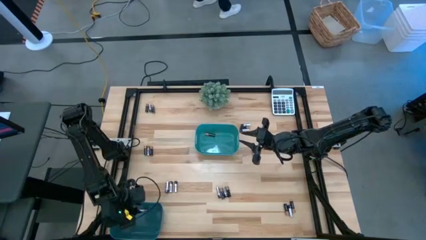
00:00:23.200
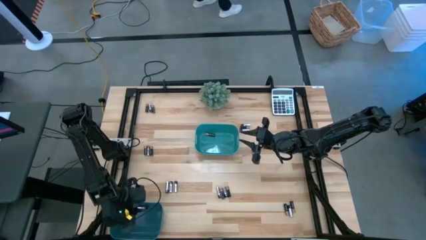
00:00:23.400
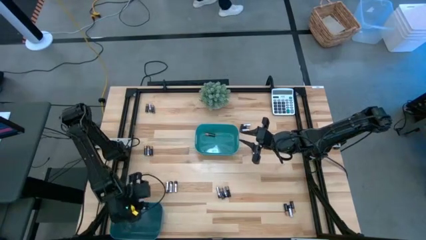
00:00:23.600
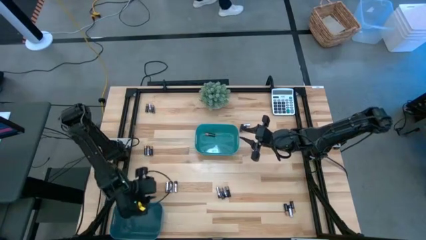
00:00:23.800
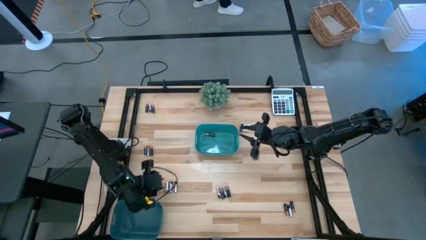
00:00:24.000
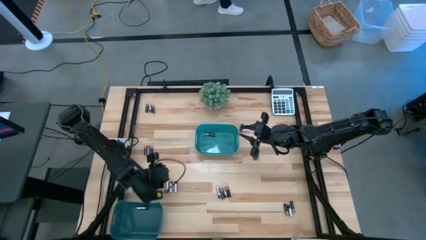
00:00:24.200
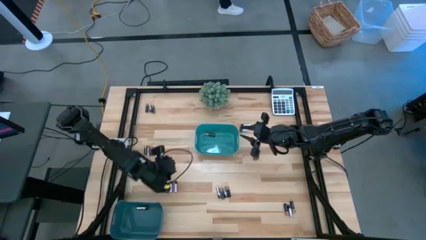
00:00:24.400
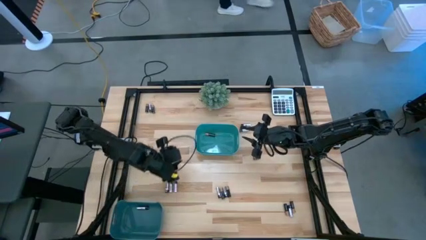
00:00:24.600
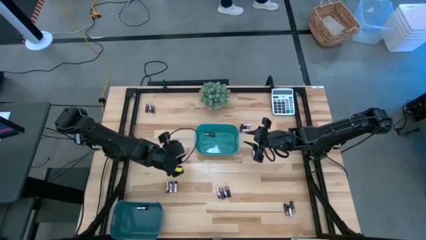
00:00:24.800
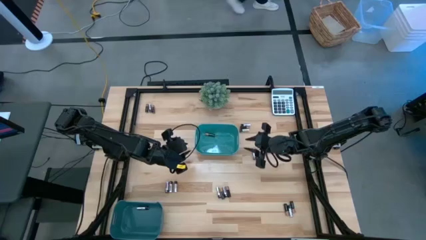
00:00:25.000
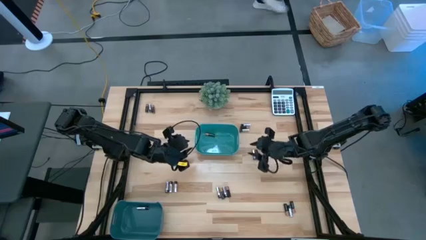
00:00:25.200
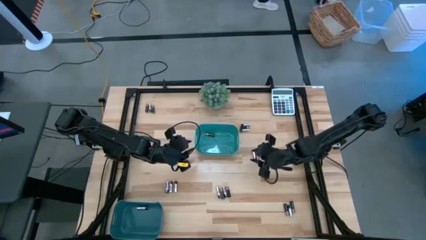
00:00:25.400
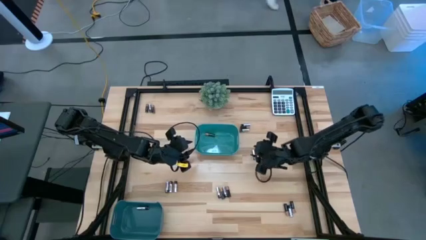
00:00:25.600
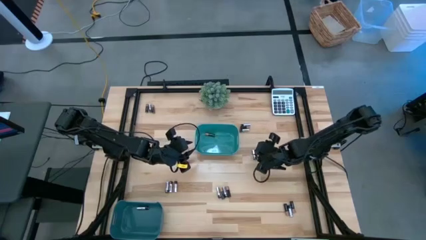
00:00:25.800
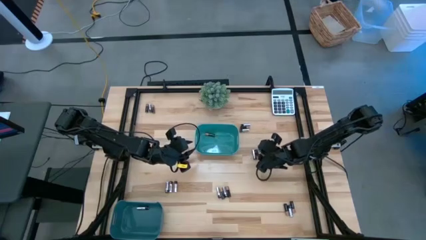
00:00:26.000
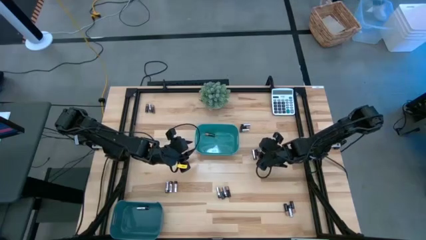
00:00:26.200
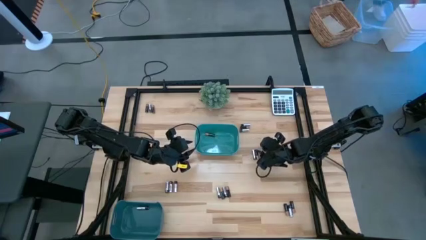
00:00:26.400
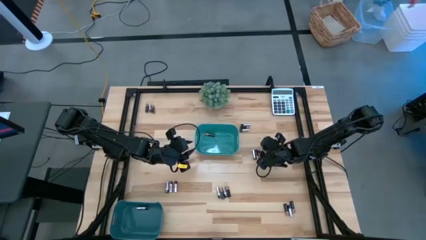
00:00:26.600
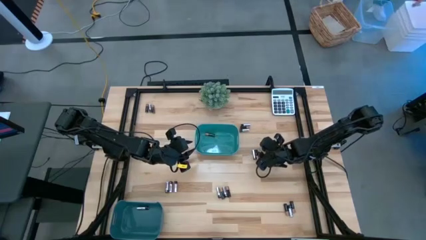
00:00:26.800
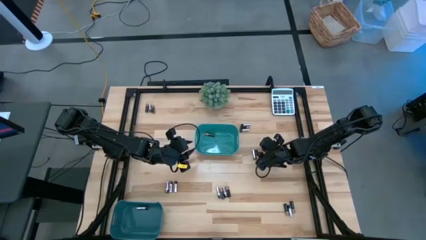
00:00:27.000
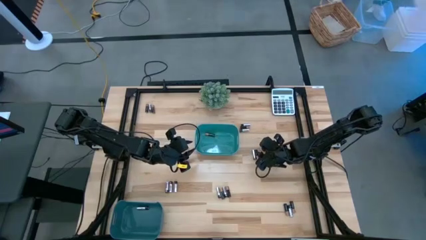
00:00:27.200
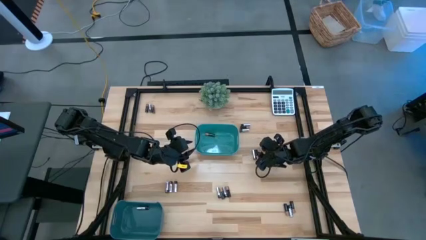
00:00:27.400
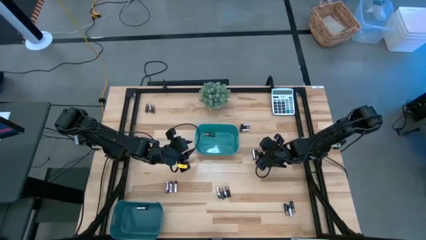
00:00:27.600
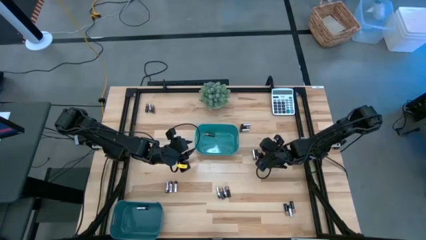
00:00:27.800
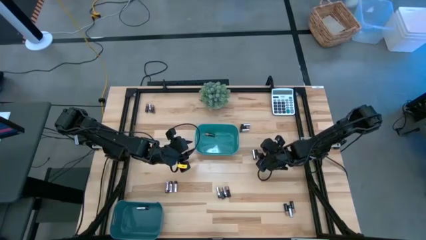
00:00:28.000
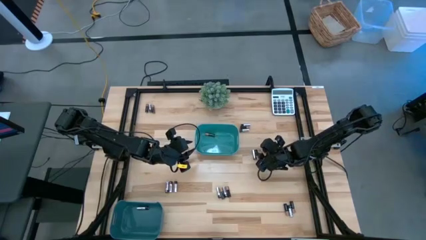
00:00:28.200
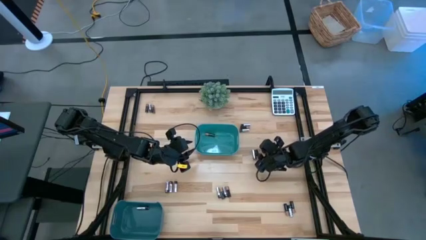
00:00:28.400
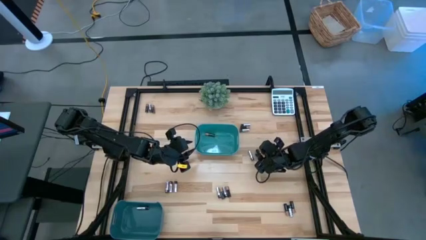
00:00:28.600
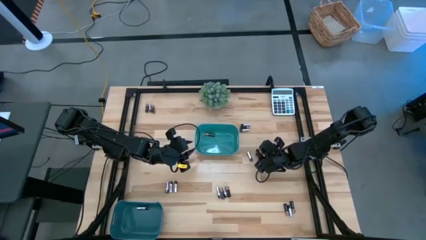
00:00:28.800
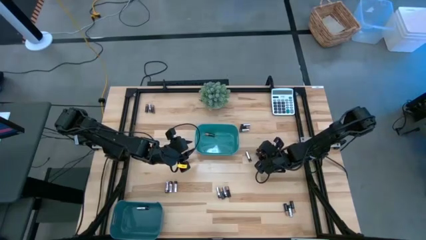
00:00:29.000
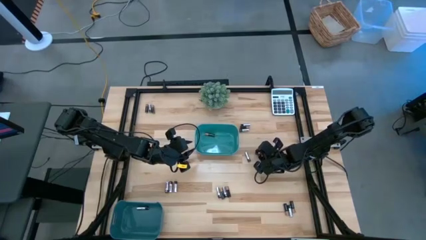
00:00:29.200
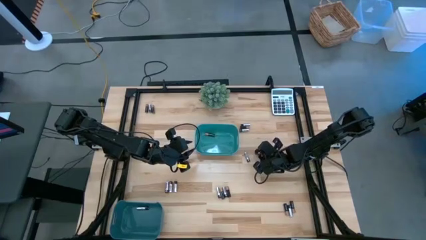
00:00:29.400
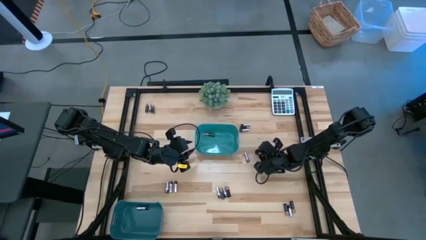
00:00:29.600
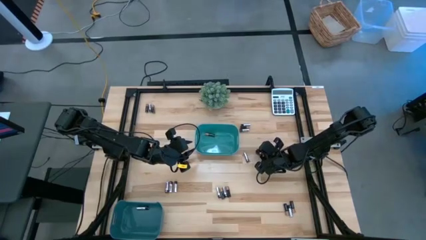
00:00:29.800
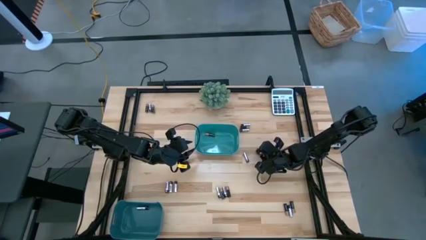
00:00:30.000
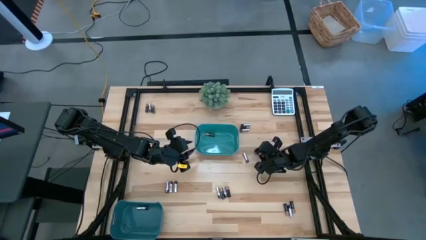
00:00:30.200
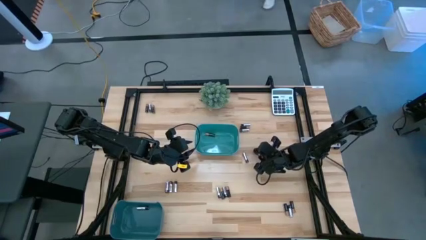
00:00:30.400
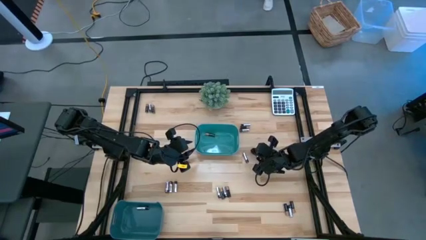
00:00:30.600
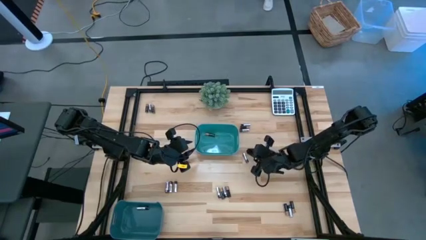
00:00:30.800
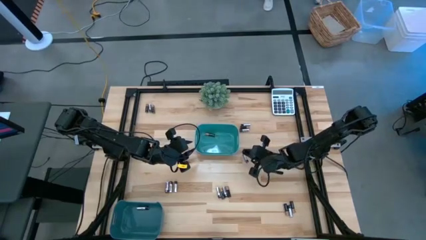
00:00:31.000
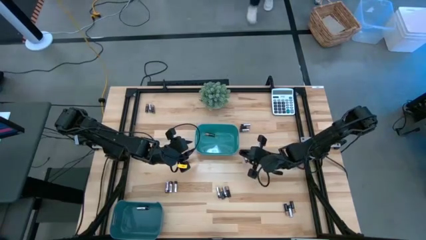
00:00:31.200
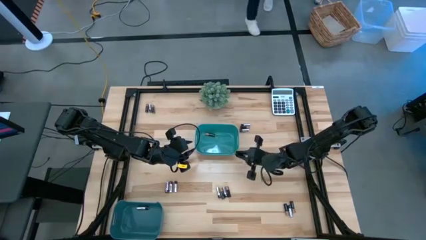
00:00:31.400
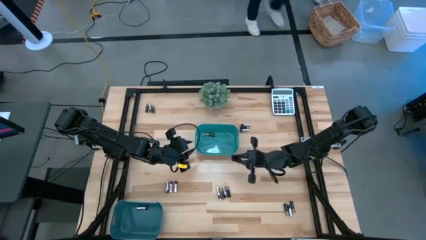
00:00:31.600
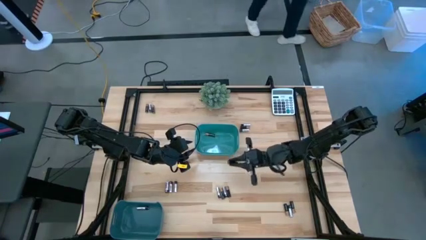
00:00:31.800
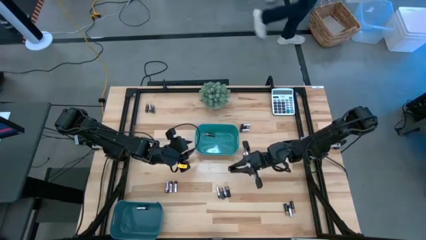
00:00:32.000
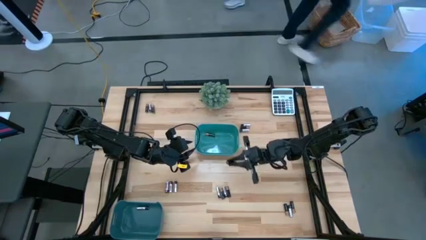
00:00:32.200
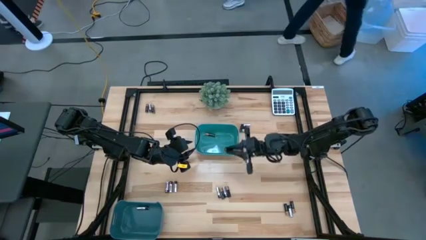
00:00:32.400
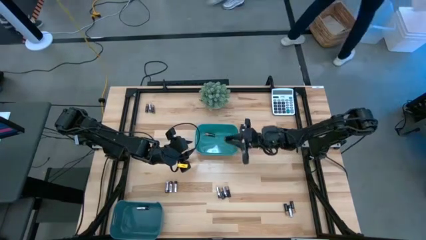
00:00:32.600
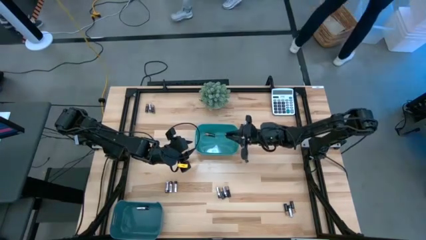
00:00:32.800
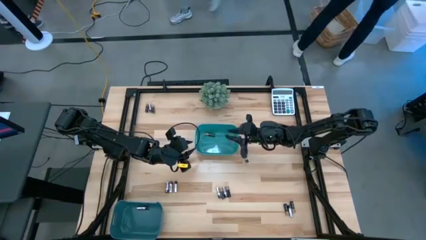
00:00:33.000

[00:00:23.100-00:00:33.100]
Task: Sort batteries
Put the black battery into the green bin

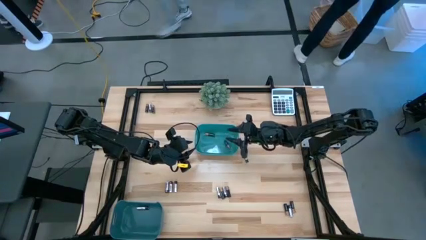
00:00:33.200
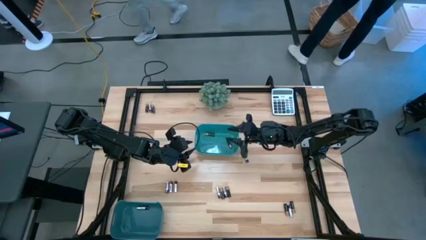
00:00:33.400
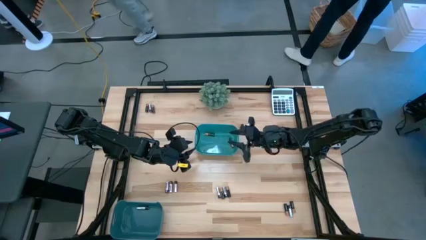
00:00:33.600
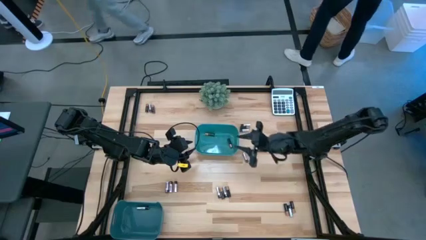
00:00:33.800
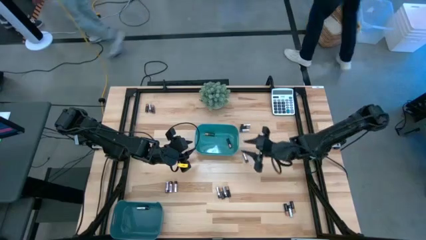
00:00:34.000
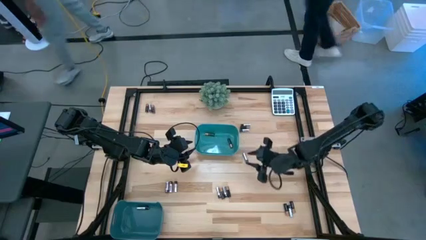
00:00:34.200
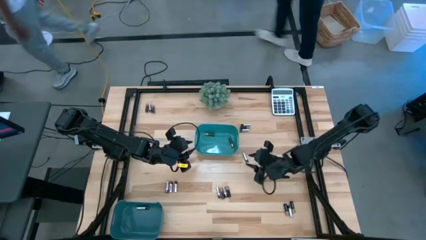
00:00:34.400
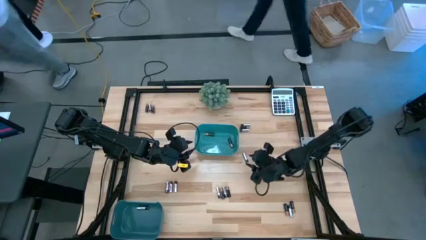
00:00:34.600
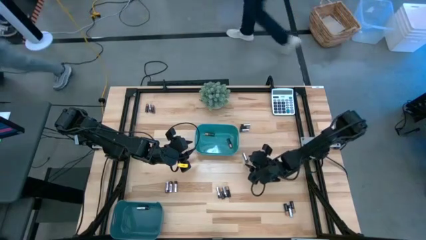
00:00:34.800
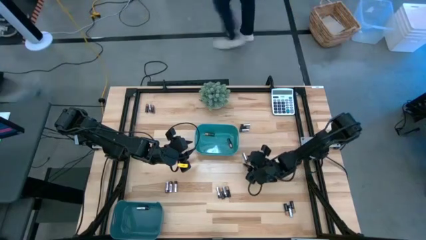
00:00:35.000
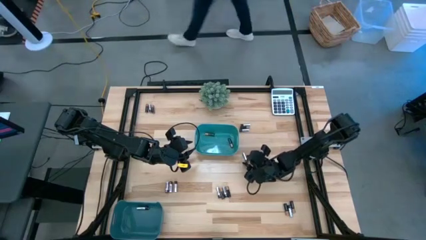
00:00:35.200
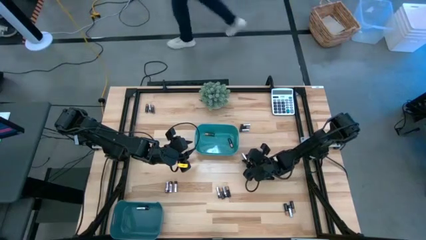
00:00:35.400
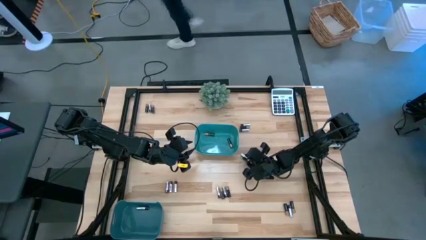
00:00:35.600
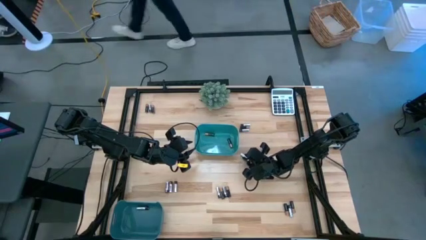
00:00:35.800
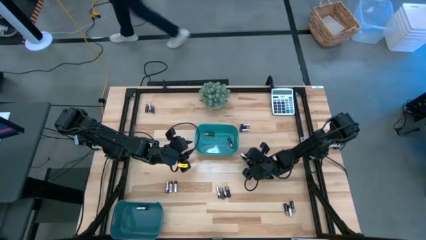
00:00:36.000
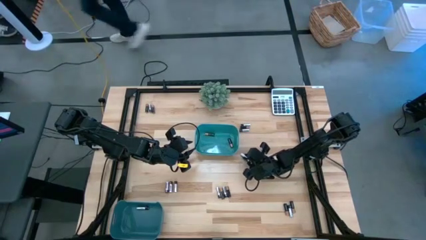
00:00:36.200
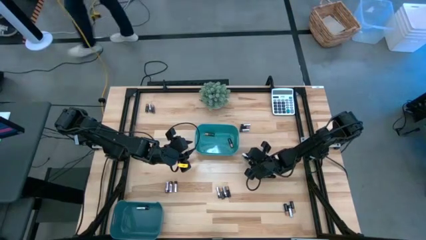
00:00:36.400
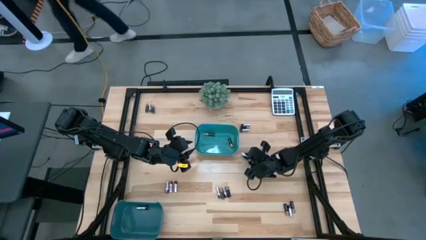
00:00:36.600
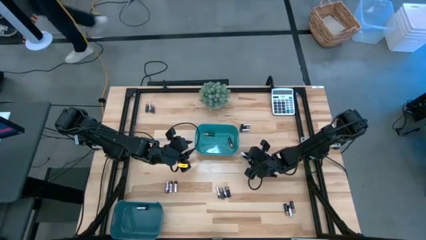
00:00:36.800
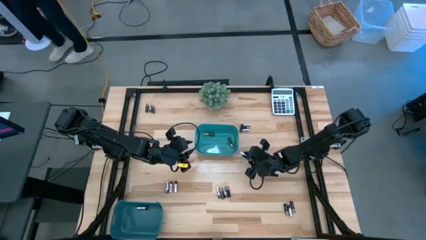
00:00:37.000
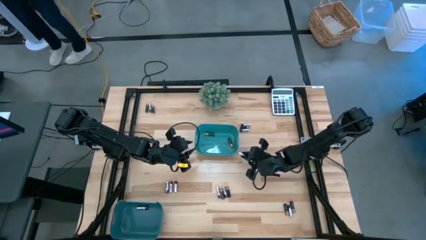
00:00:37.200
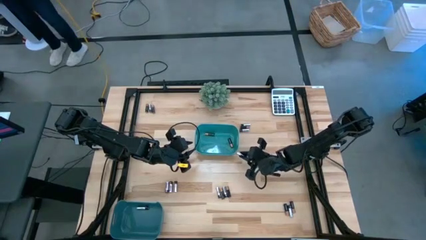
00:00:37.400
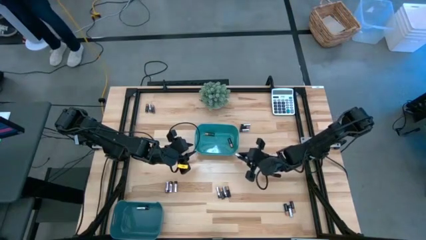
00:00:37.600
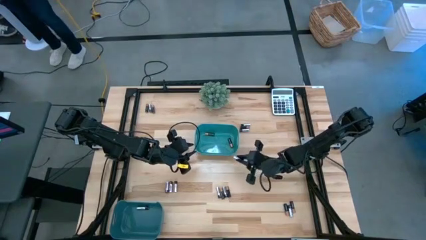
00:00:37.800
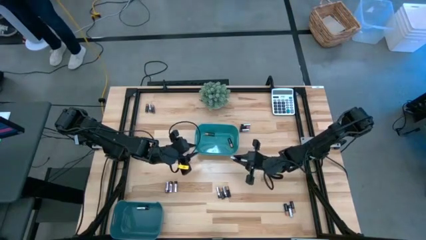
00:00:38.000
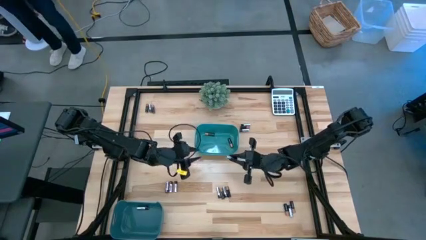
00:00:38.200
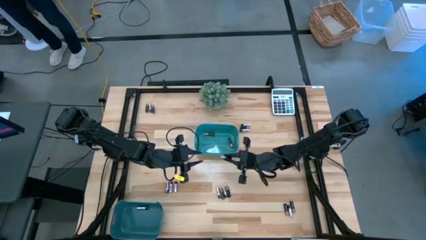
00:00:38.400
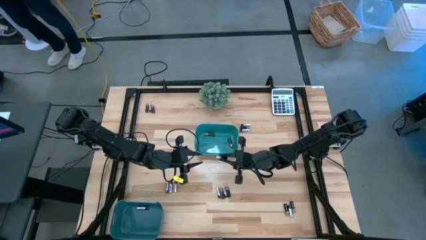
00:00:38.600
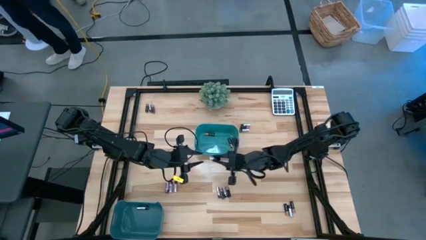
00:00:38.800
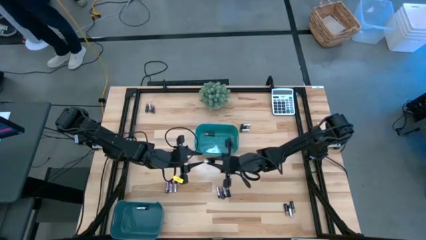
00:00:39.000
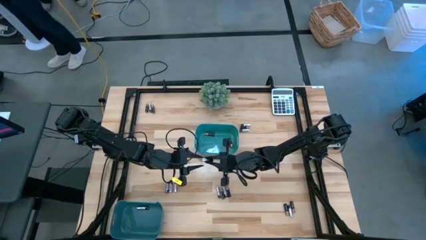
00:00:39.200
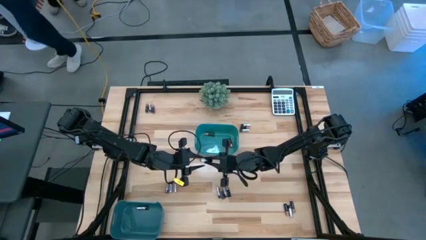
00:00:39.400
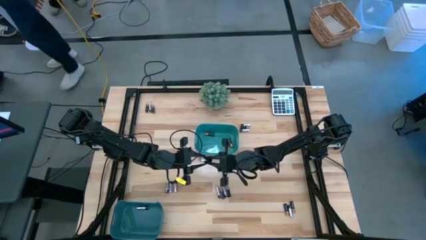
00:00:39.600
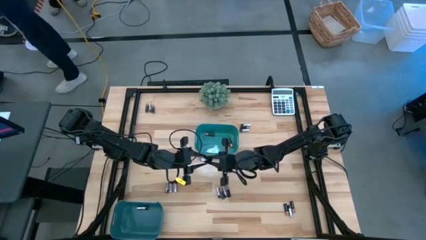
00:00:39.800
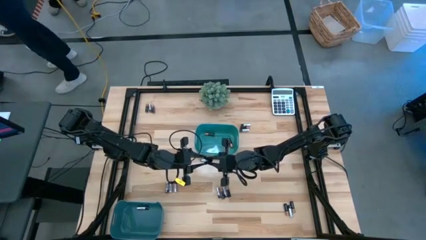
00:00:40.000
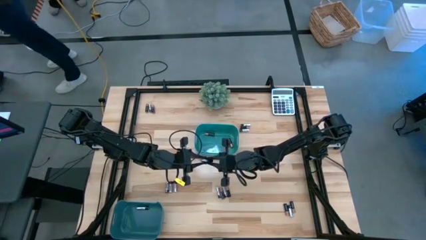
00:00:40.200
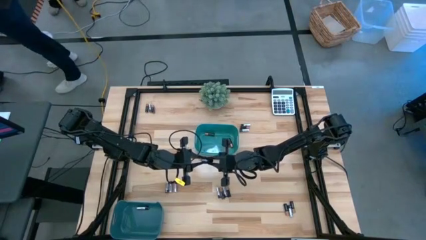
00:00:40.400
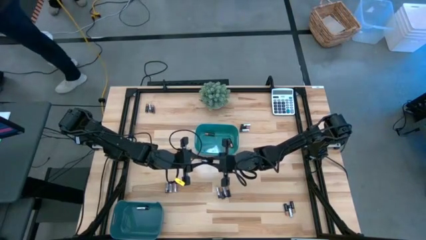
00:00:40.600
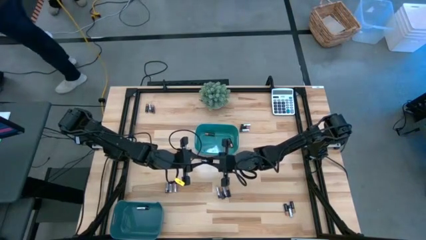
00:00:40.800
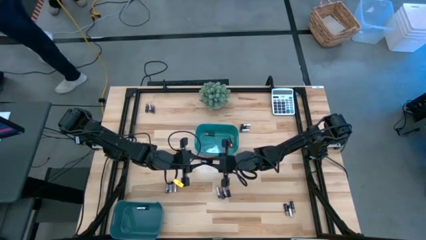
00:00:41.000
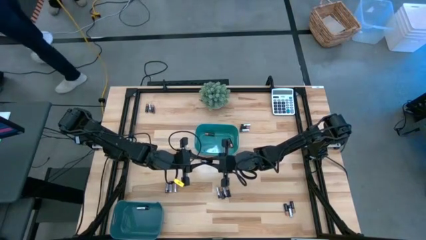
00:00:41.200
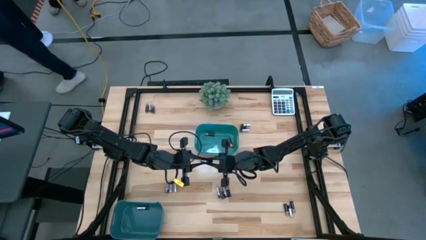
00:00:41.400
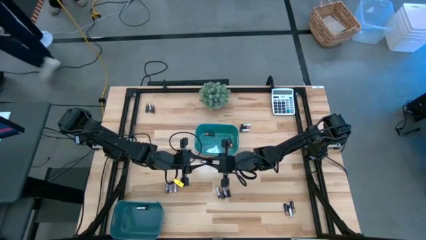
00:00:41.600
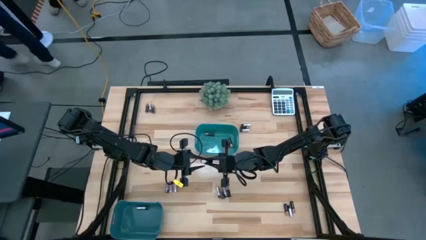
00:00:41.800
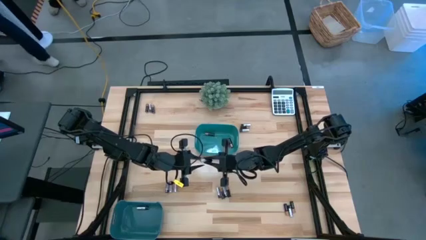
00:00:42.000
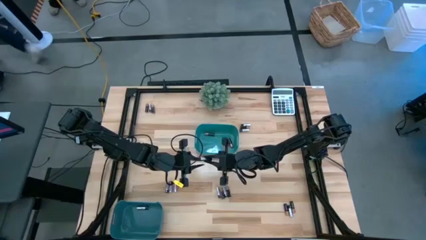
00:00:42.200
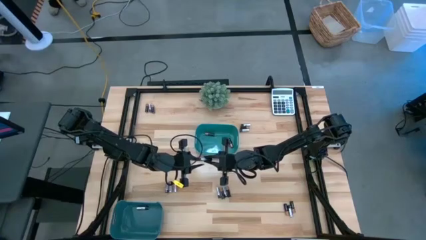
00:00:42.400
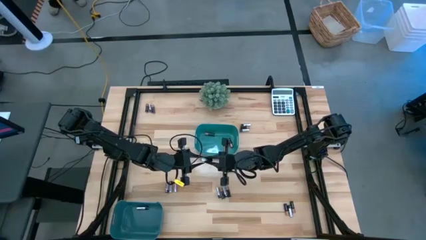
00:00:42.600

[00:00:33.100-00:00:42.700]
Put the silver battery into the blue bin
